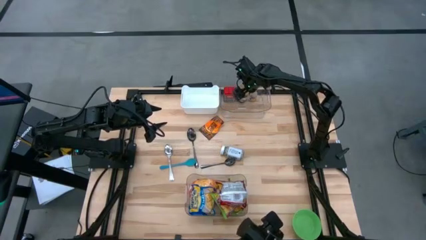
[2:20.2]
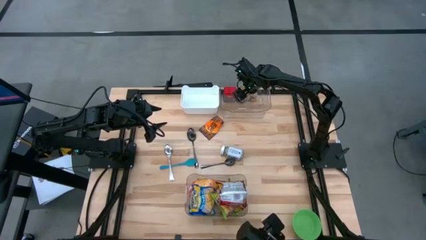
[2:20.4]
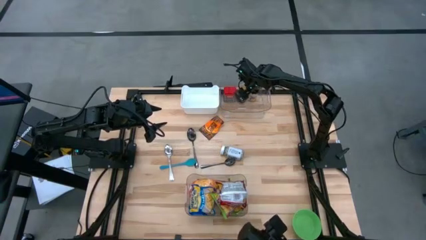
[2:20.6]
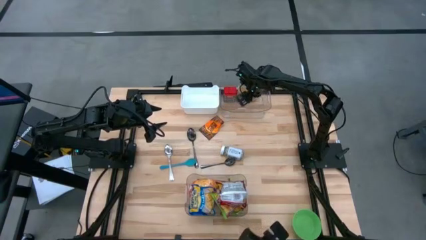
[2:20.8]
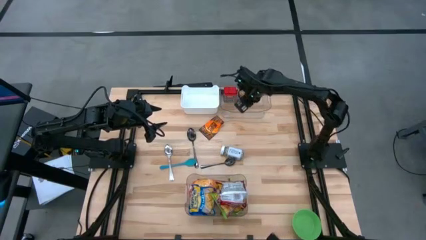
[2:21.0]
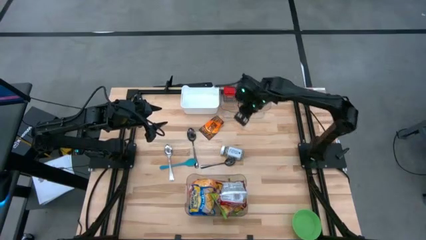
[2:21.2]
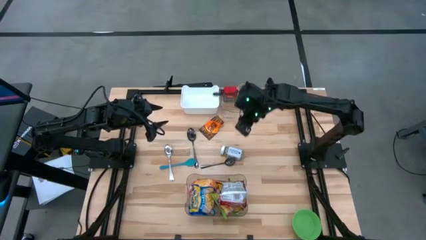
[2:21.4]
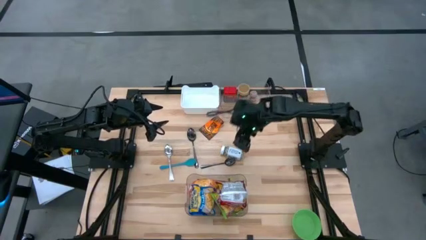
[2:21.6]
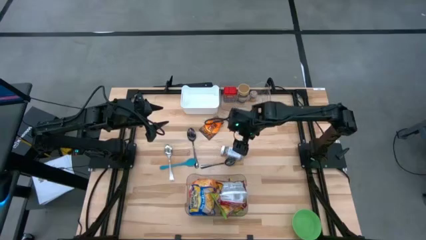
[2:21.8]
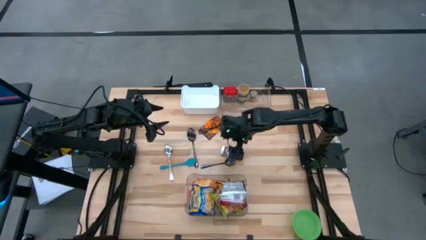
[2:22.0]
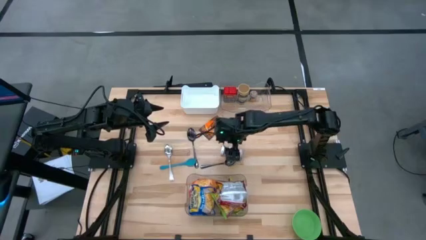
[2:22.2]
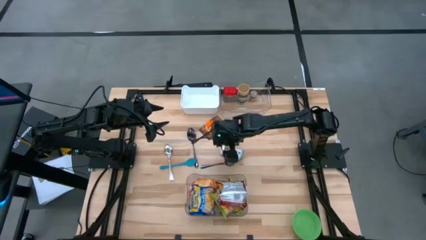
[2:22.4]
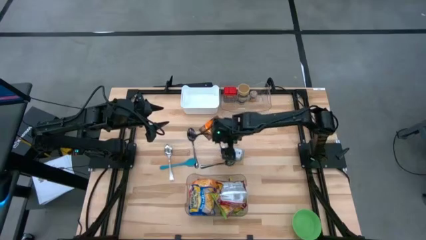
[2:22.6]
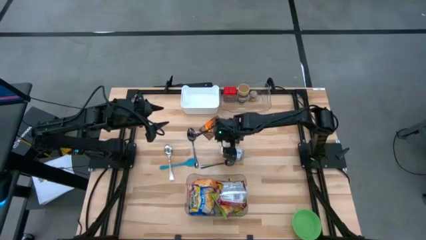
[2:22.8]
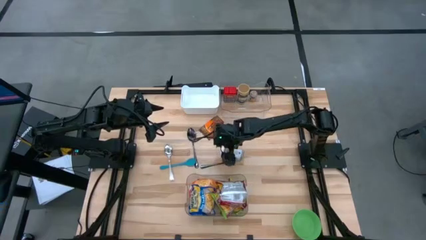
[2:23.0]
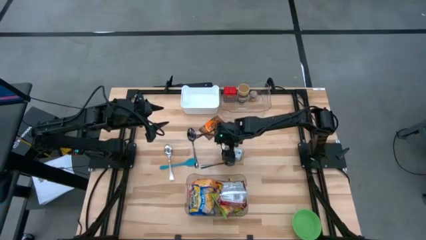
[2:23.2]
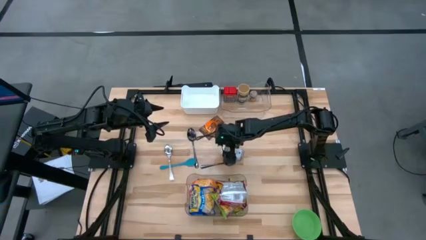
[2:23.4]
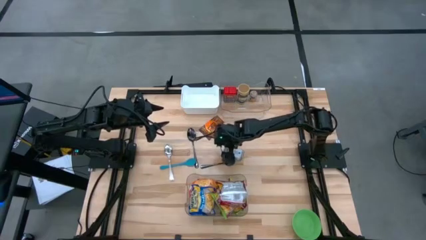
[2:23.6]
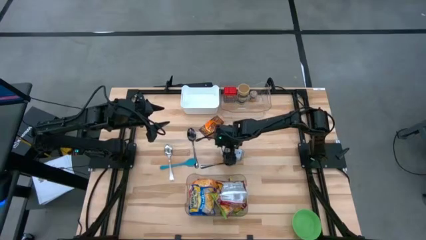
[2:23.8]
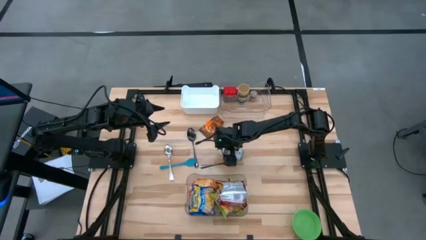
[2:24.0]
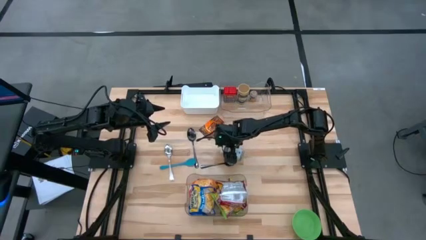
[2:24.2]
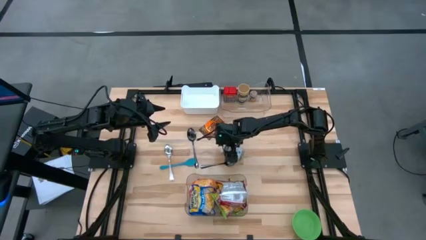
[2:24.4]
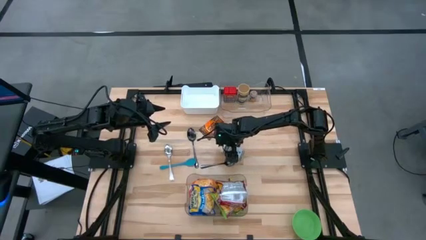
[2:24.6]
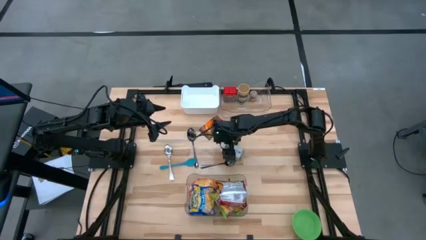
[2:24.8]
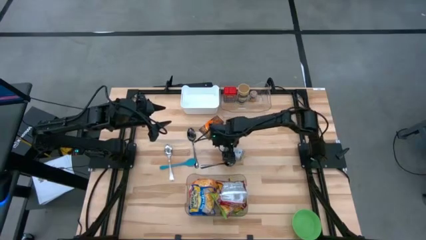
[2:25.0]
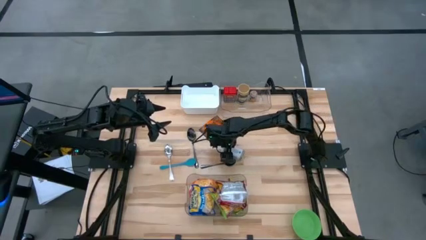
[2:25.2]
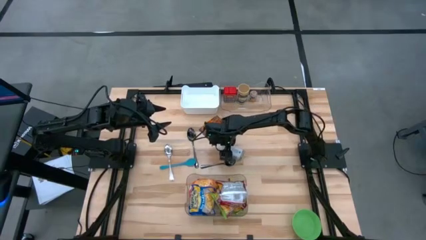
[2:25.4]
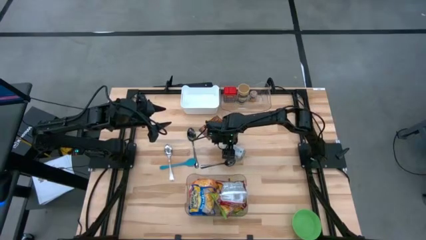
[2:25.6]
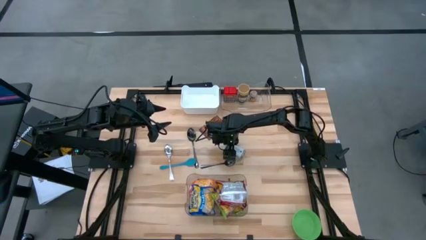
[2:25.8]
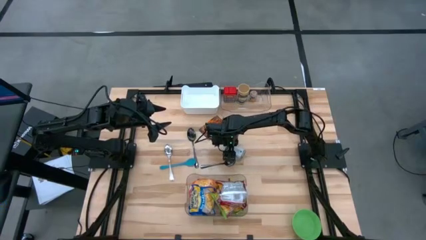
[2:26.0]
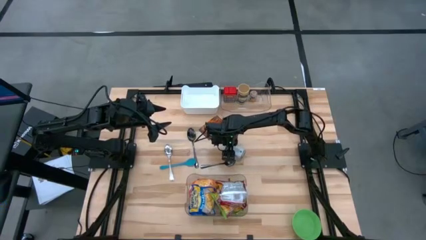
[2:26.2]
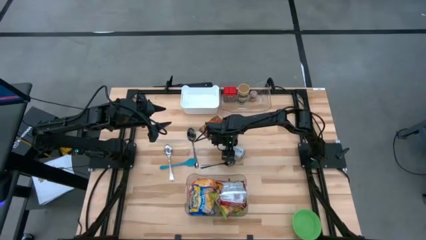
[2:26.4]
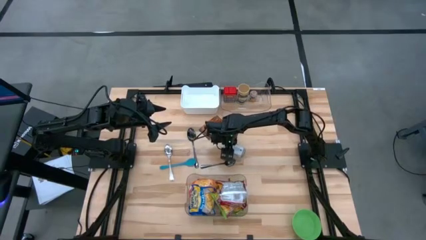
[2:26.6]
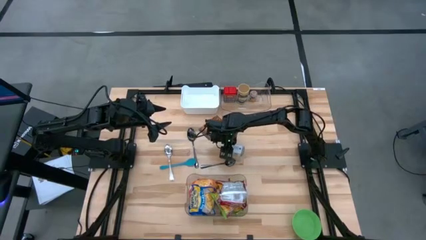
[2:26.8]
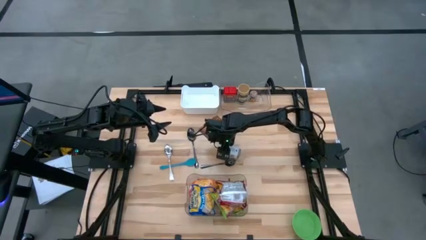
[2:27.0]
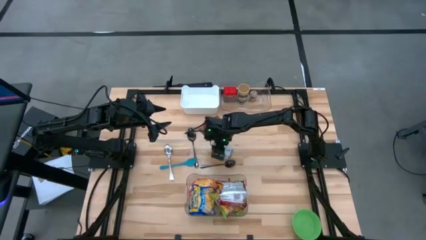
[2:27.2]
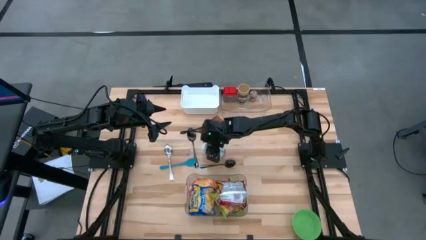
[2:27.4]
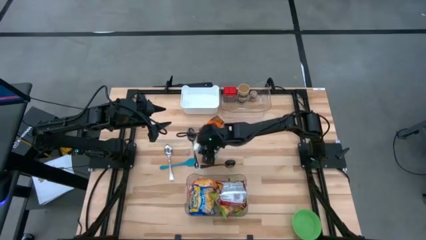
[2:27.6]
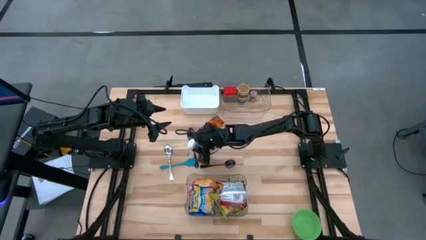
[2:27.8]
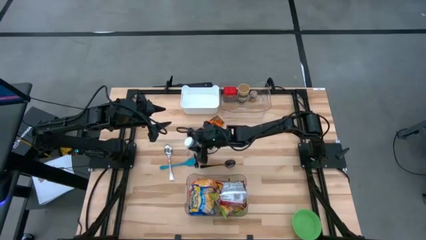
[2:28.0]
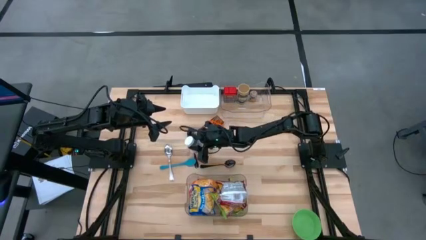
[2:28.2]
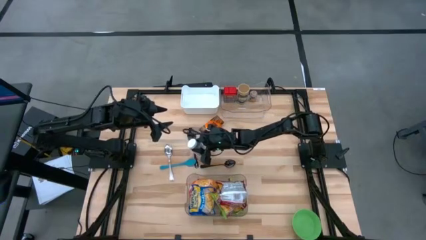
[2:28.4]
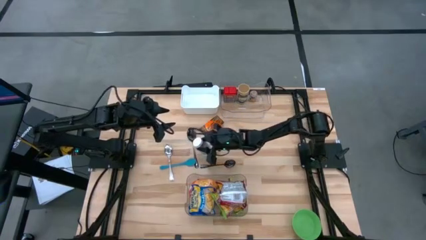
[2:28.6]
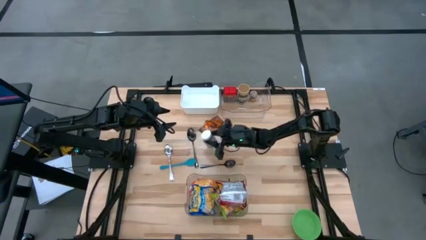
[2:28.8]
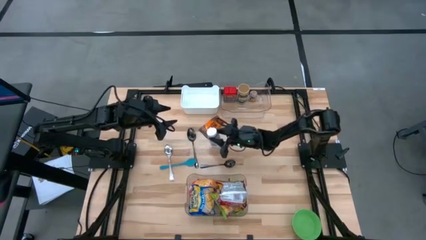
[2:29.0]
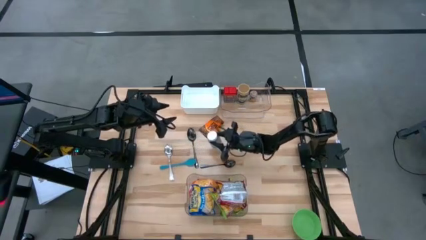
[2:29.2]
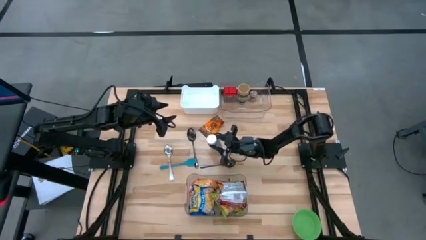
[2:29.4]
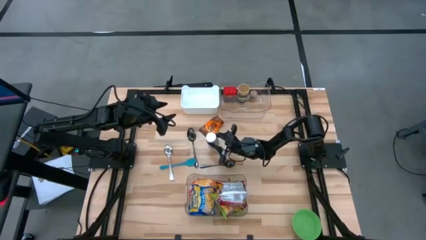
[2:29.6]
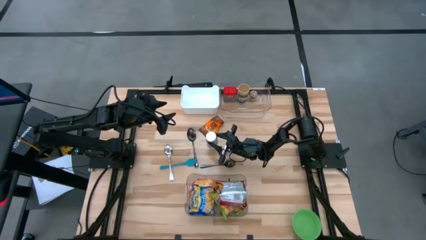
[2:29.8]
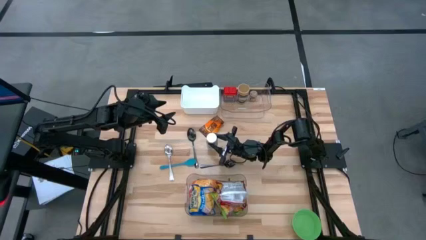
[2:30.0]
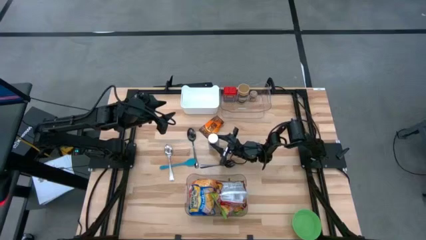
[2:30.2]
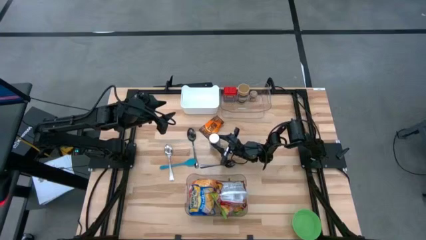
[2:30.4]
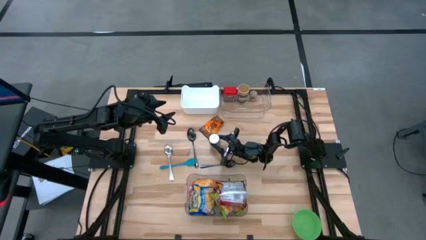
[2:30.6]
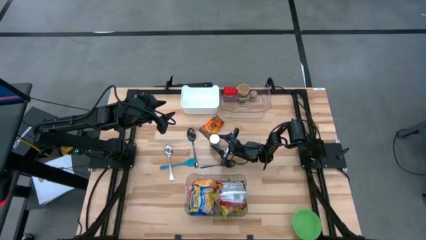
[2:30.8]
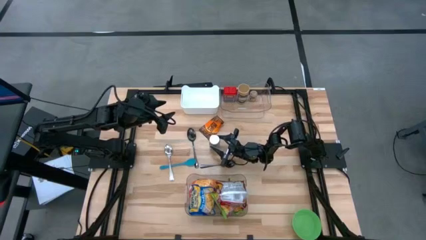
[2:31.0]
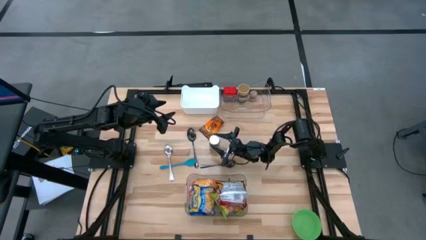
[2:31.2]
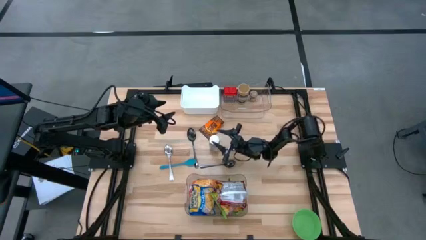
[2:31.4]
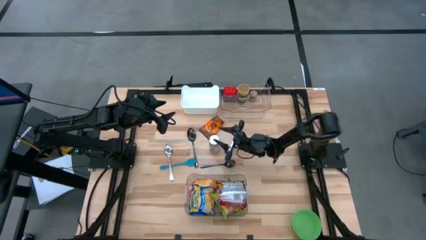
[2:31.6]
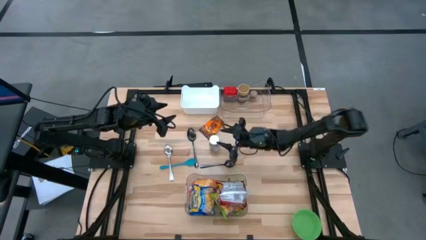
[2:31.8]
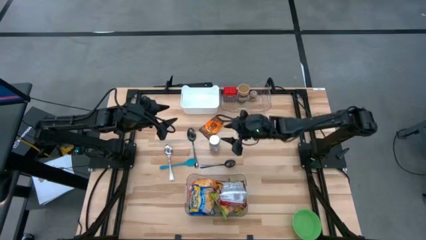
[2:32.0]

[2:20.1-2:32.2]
Task: Pick & Place Food Item
Put the white seasoning into the top transparent bin
